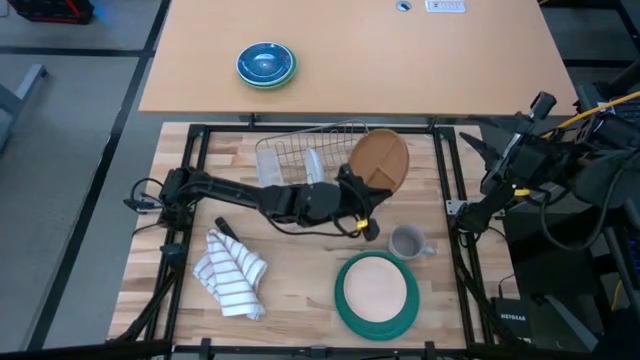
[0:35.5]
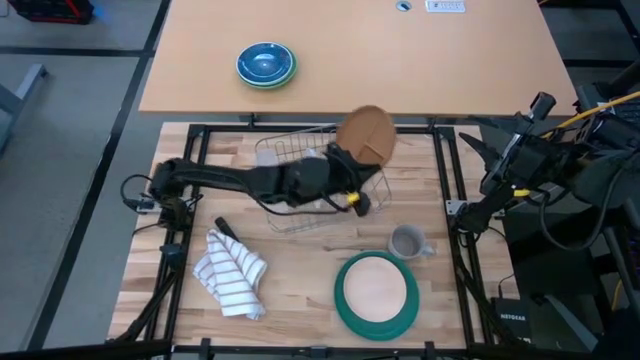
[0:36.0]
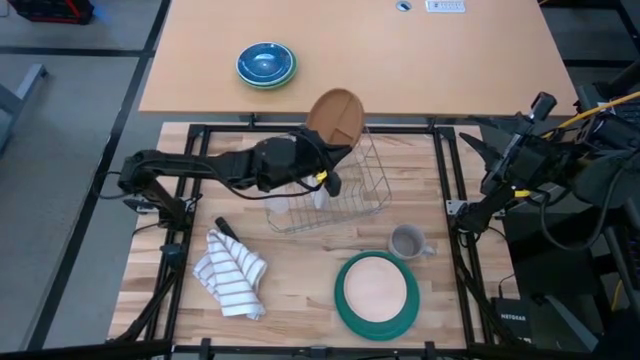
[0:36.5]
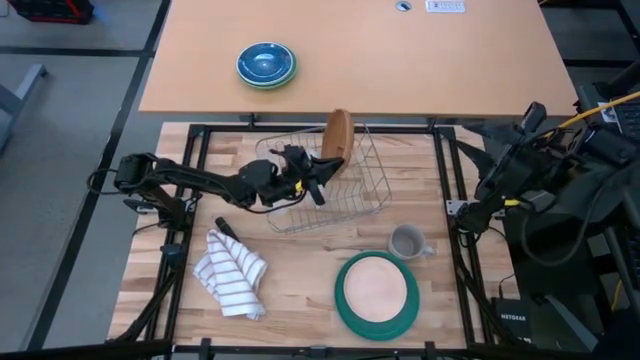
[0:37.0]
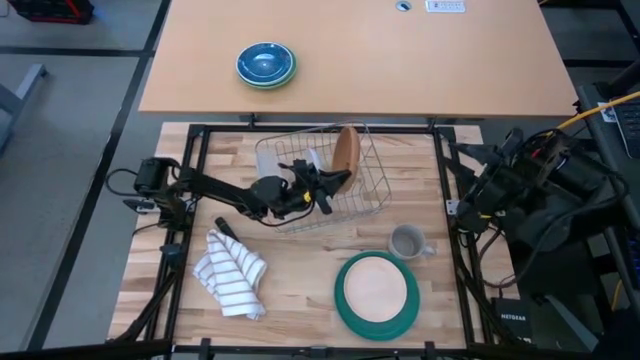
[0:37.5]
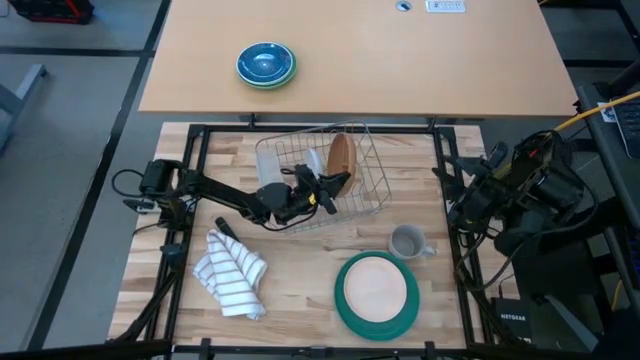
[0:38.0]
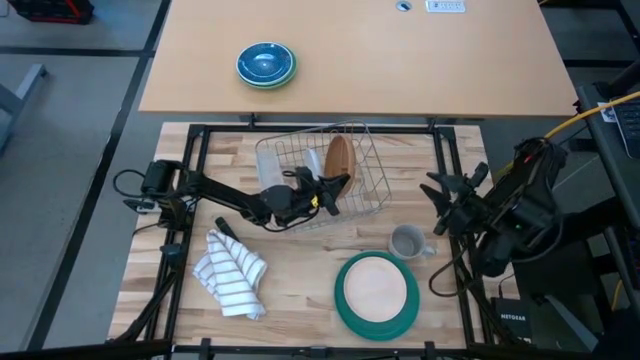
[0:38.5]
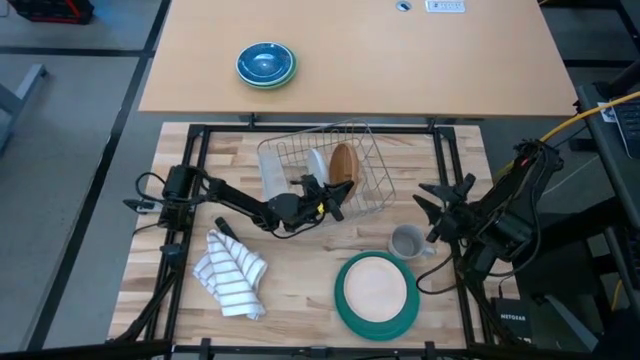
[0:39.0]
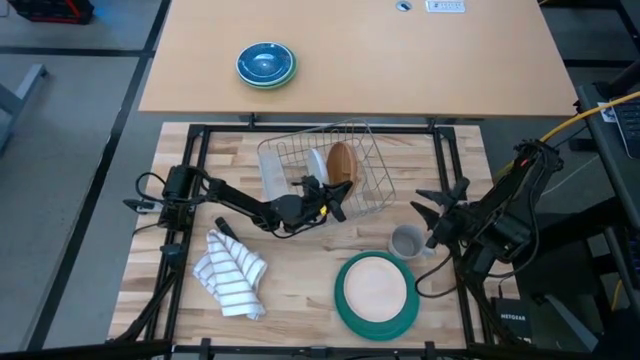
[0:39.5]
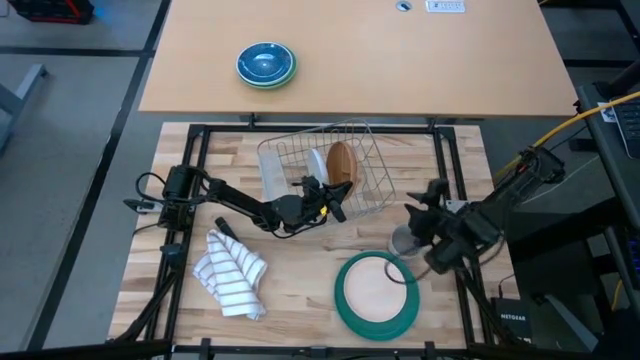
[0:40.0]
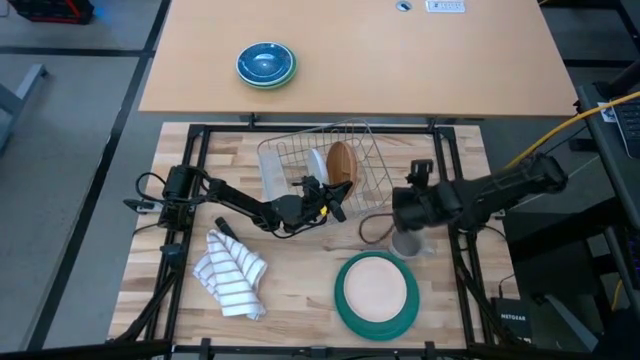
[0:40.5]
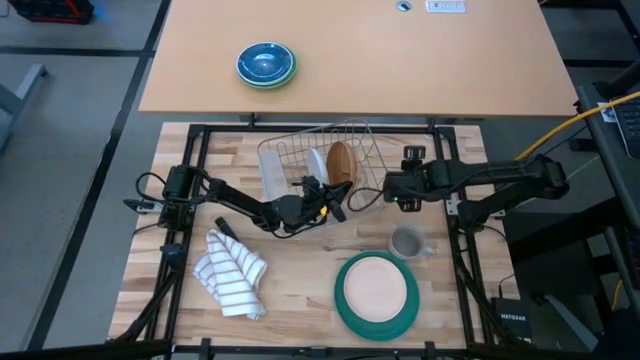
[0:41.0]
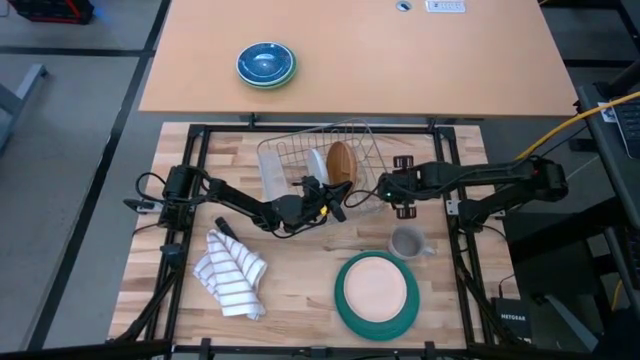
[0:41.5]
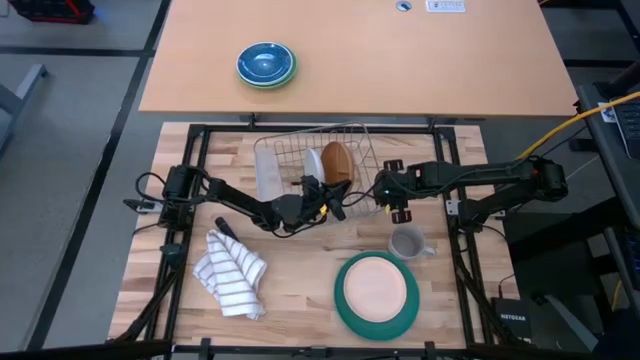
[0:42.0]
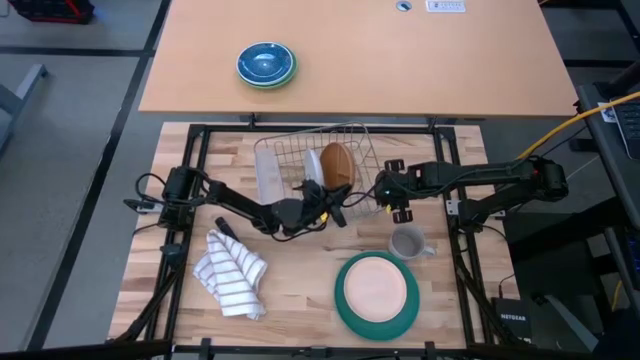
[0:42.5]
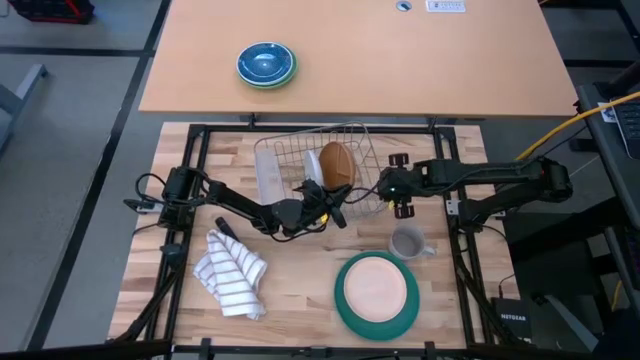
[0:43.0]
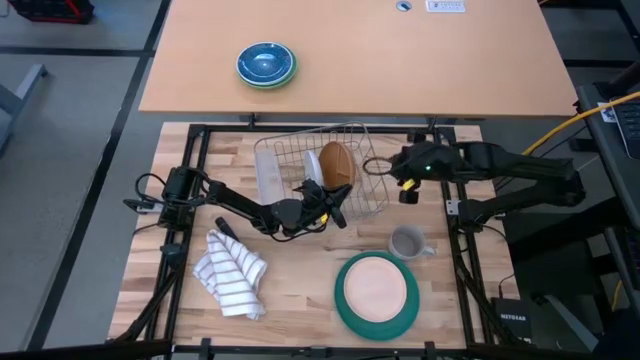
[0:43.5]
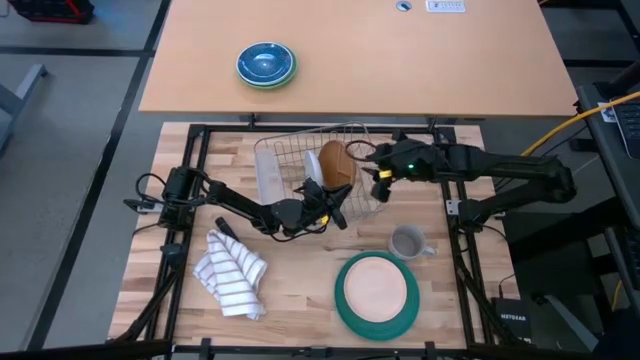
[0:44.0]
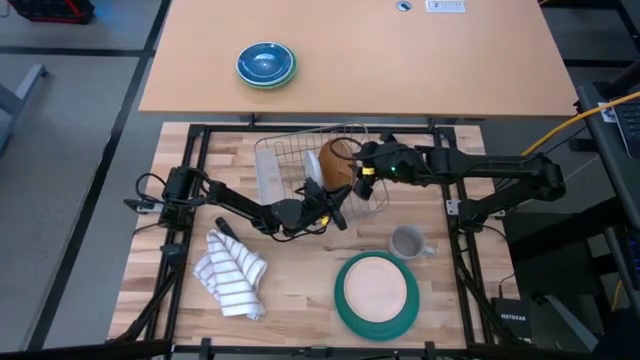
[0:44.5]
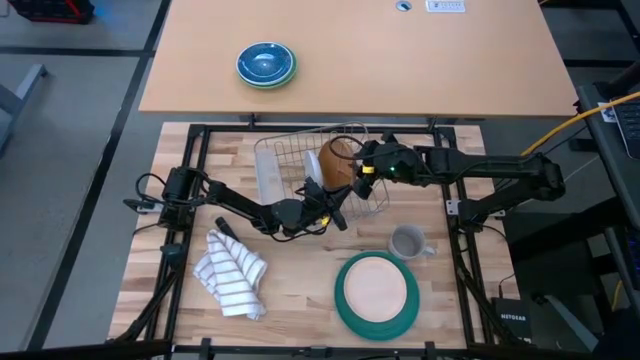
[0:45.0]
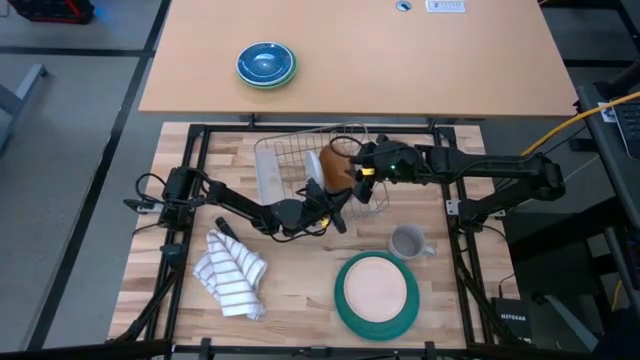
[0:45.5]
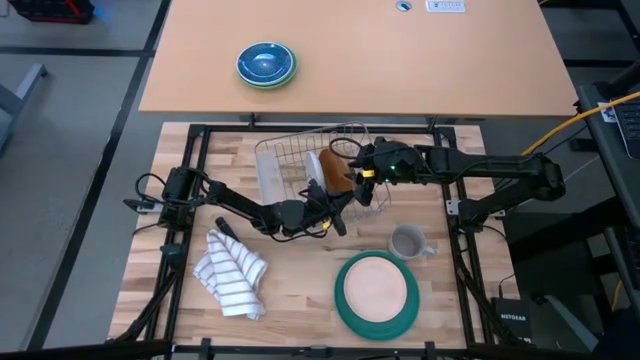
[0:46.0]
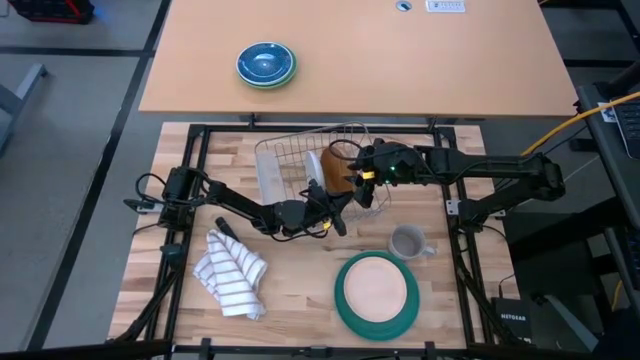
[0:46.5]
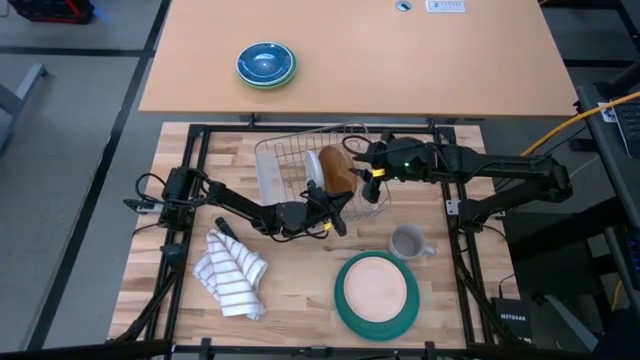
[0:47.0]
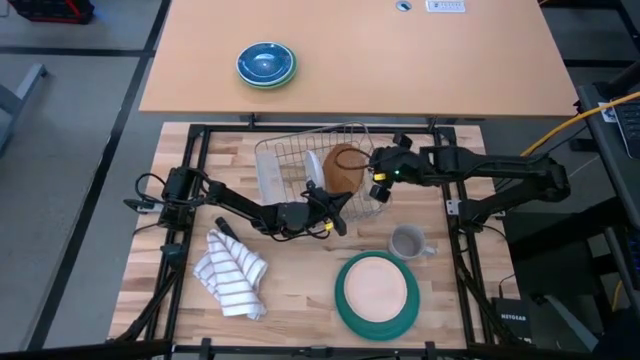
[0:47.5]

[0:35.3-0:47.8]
Task: Sort dishes
Put the brown plate in the dish rack

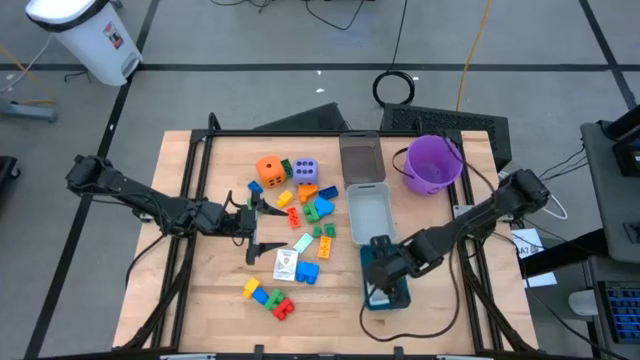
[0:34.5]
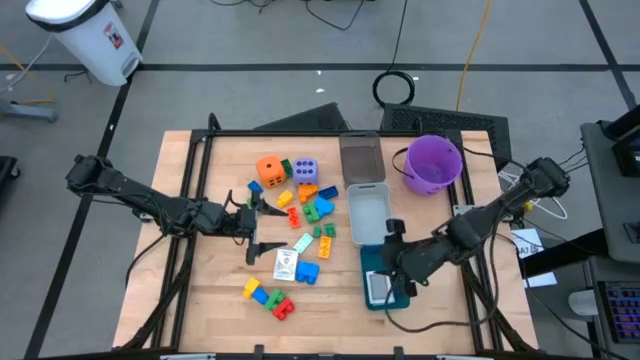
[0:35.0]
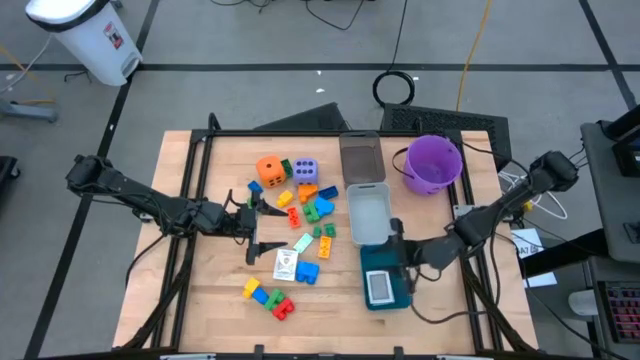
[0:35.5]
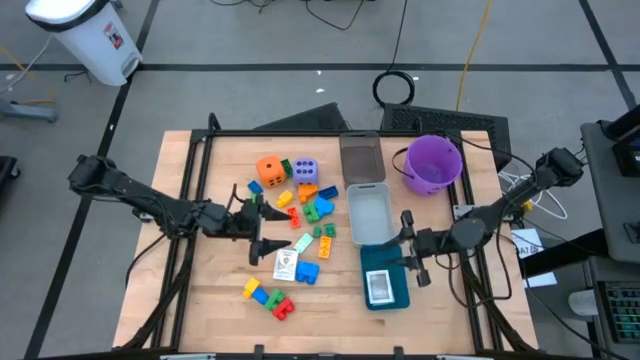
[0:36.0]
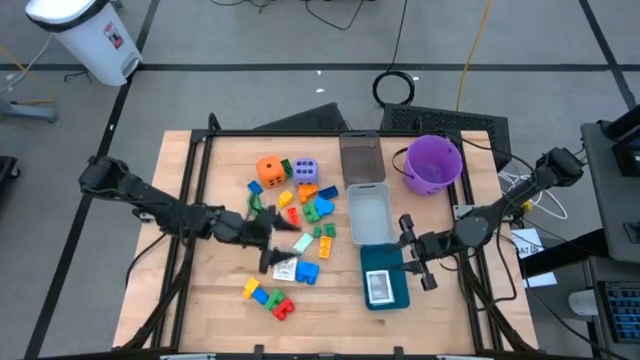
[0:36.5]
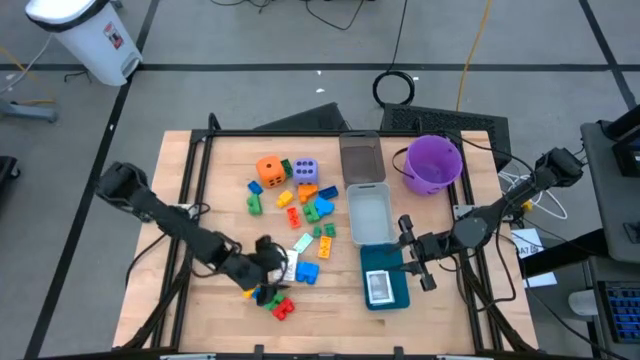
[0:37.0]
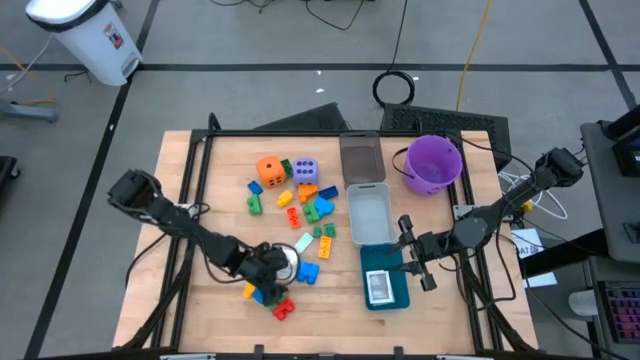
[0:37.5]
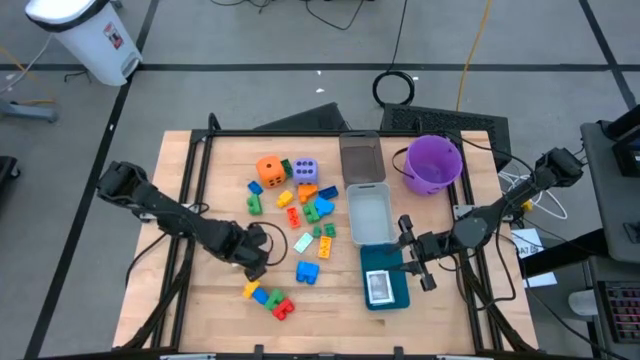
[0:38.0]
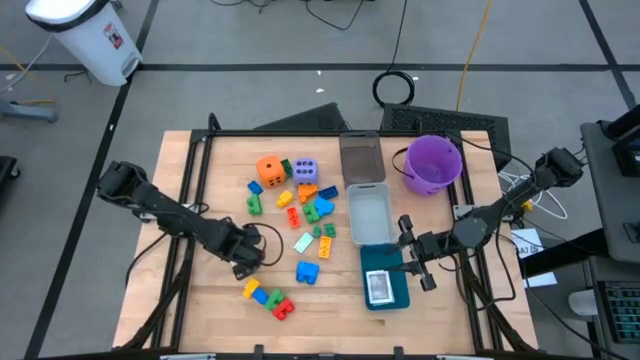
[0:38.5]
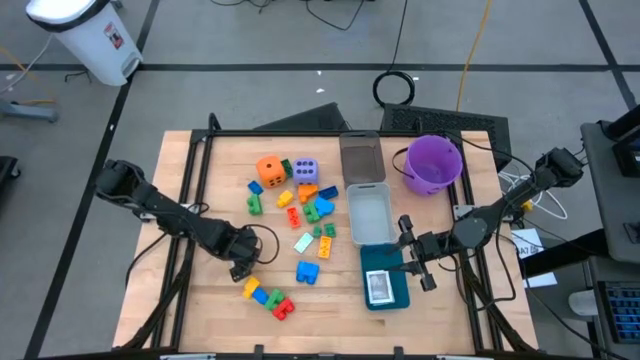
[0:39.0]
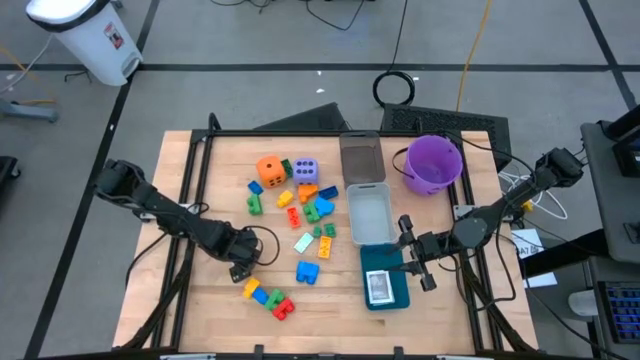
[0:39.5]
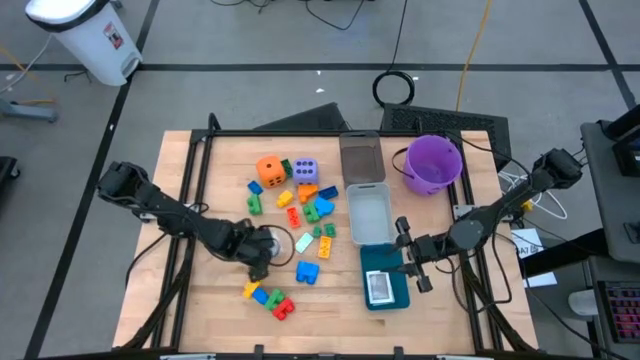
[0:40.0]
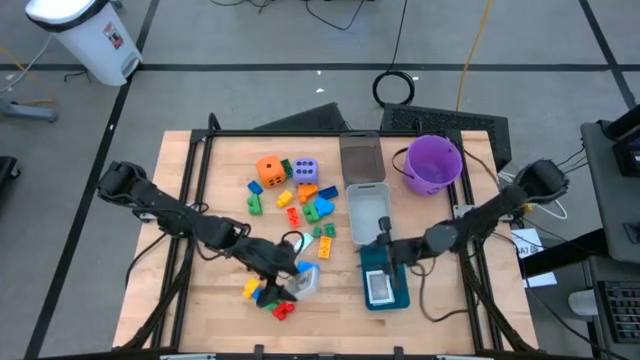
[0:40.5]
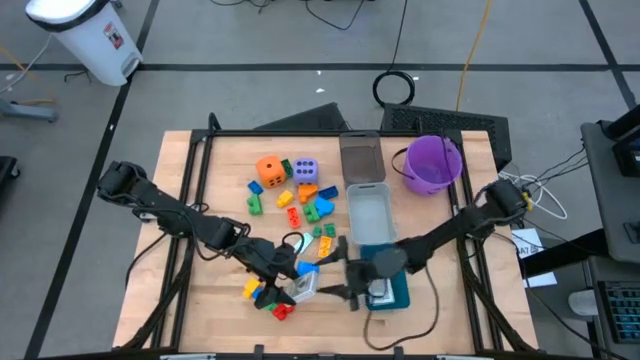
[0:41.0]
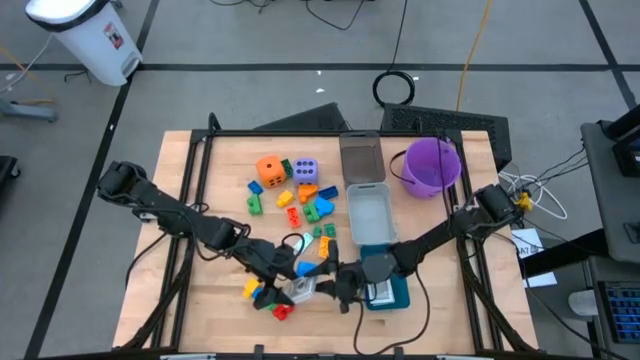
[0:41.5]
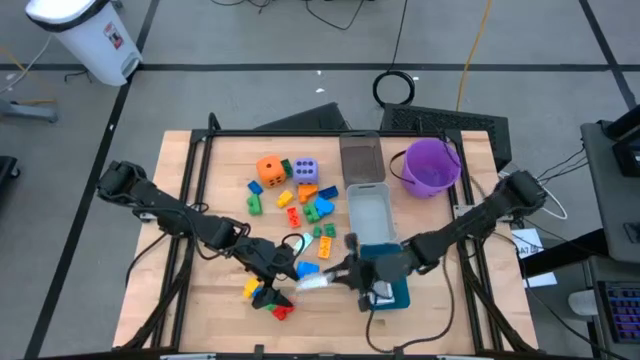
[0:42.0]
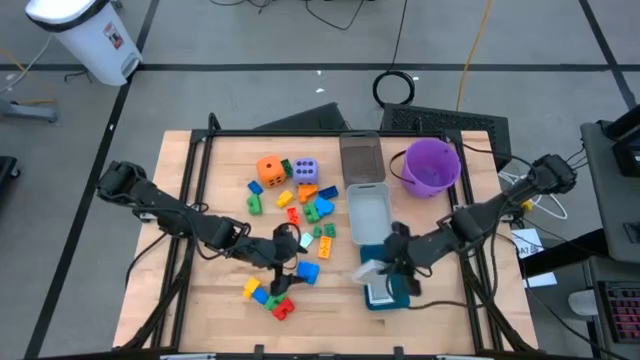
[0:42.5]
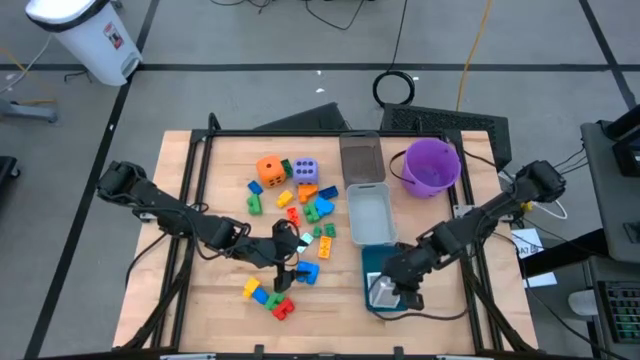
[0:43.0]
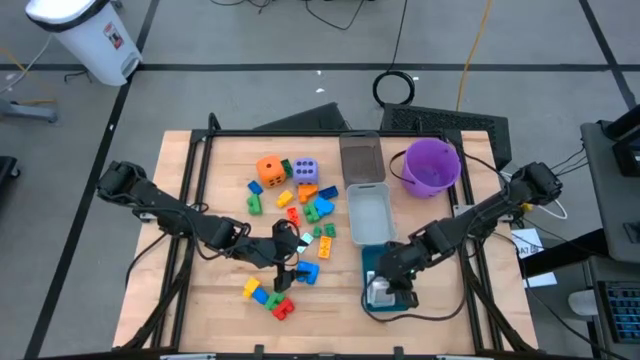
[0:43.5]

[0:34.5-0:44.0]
Task: Pick & Place Toys
Put the brown deck of cards into the blue bin
